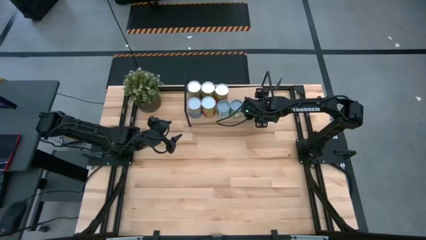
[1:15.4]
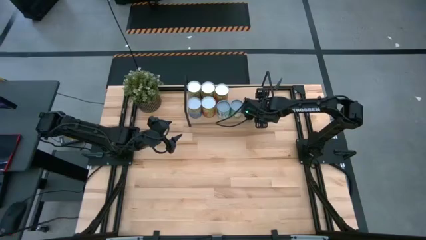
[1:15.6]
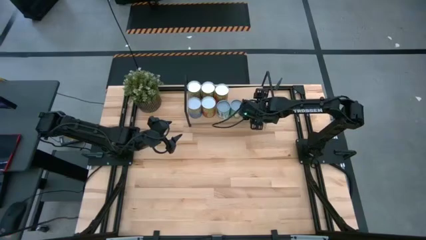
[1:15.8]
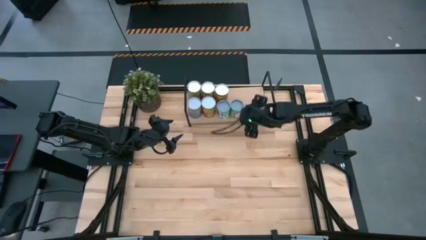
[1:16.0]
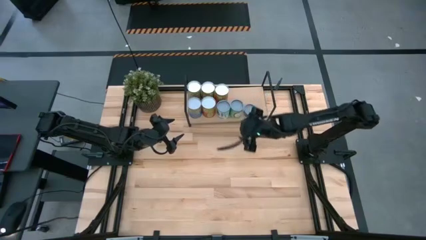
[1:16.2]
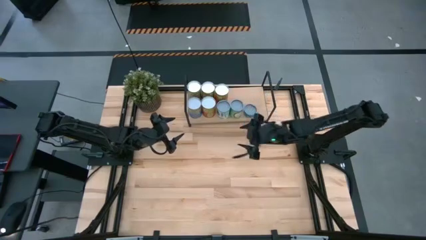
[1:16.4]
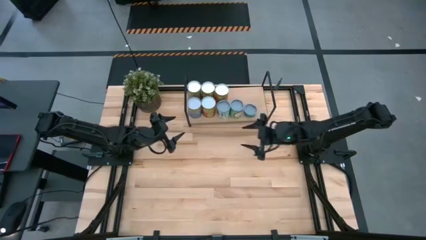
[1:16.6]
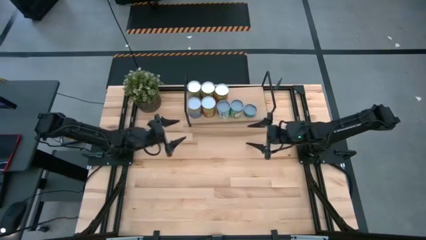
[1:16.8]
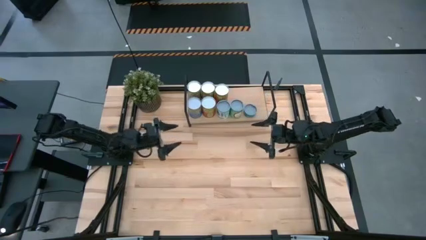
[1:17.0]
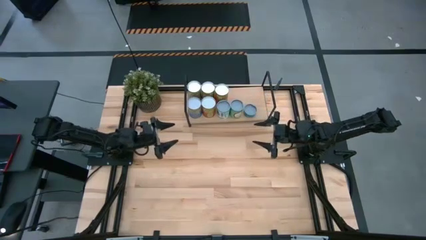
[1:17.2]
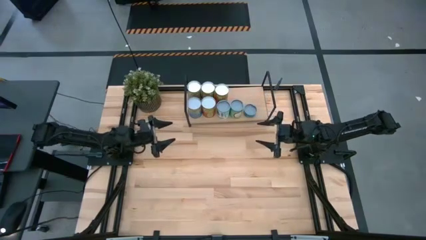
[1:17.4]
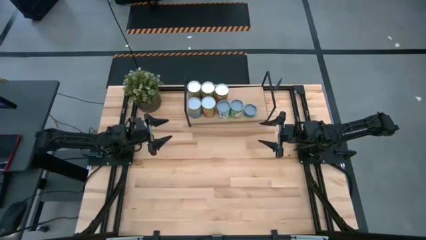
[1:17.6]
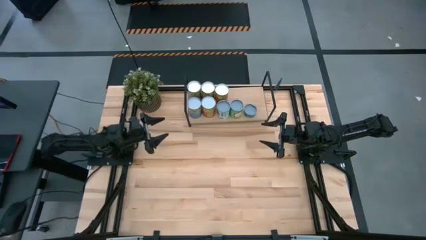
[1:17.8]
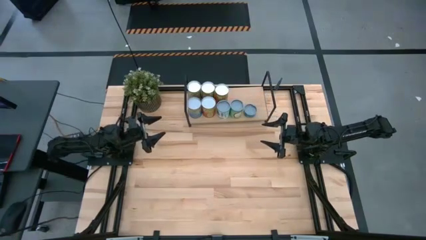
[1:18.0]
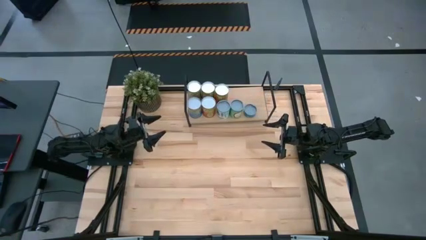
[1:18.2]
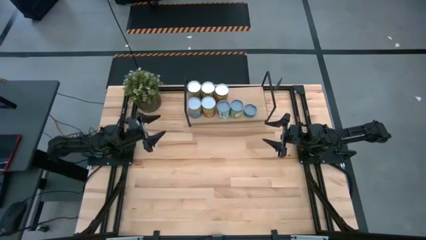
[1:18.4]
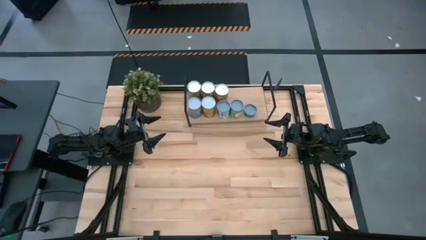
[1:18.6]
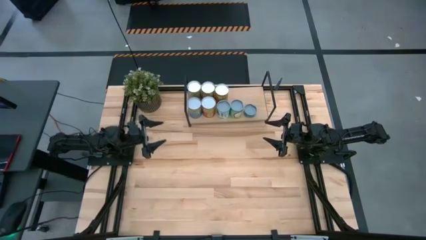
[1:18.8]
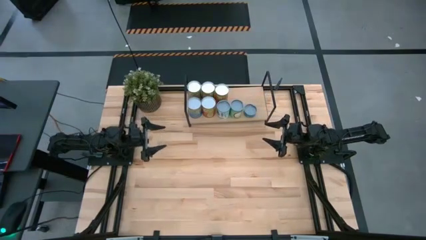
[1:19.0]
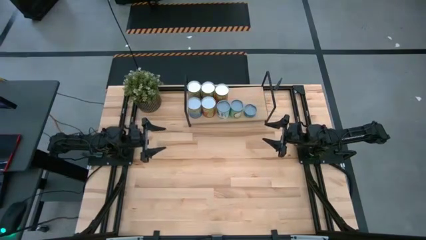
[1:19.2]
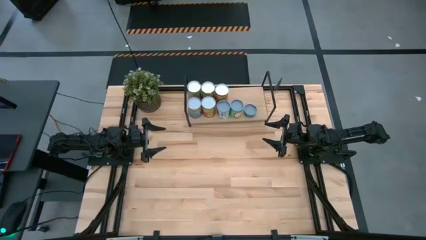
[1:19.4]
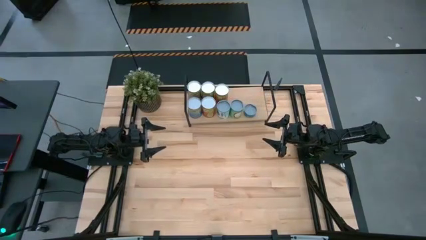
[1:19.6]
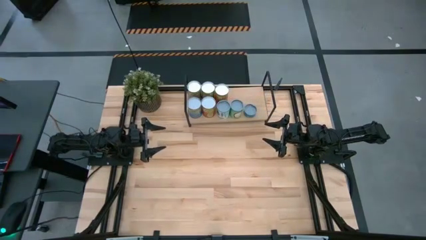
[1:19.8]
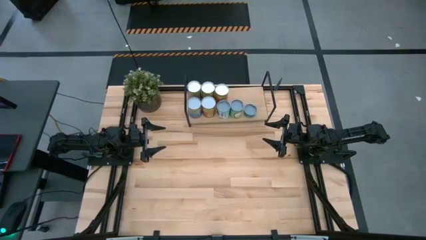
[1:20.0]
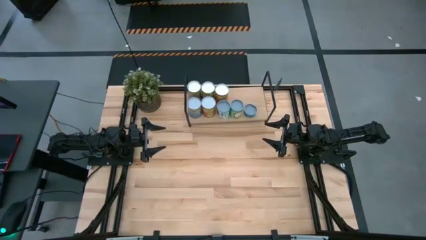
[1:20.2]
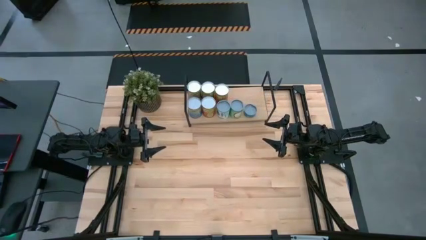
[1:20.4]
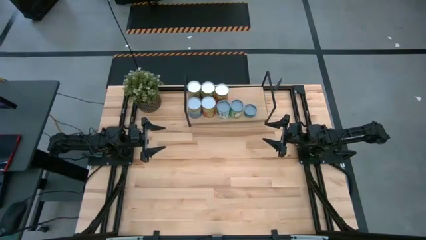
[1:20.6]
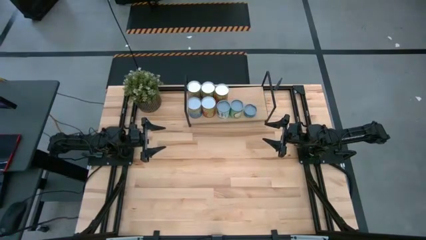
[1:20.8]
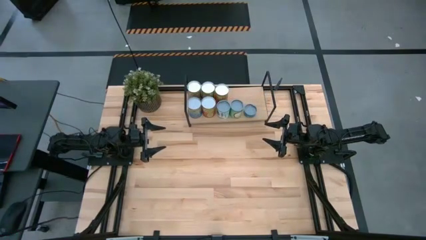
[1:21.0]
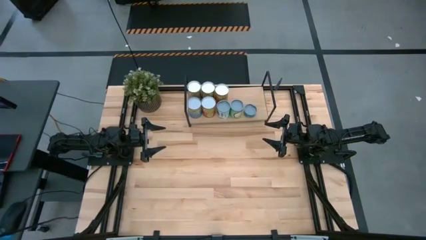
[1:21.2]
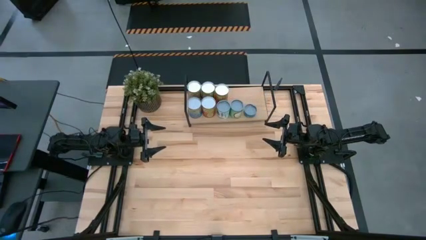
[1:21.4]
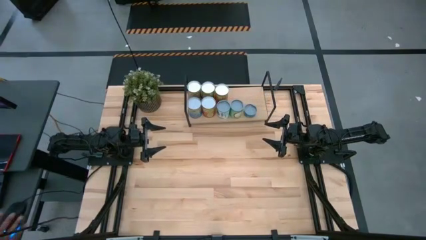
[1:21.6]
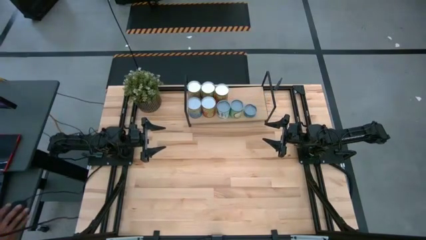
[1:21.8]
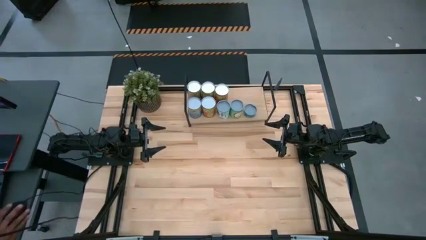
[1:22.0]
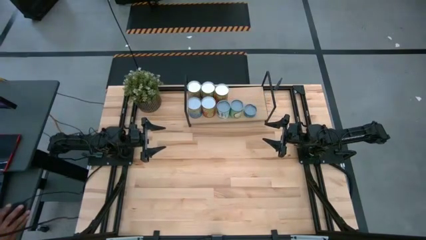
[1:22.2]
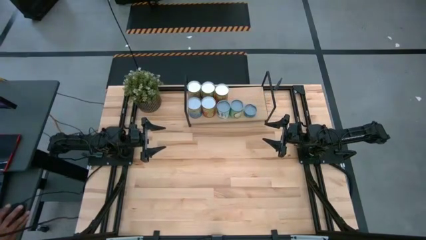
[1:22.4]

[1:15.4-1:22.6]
Task: Pick and place cans onto a shelf
Return to Home Position
